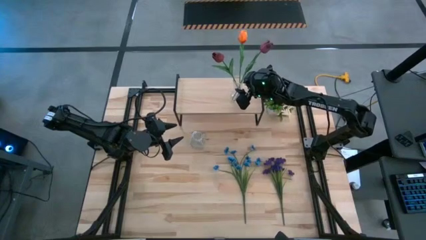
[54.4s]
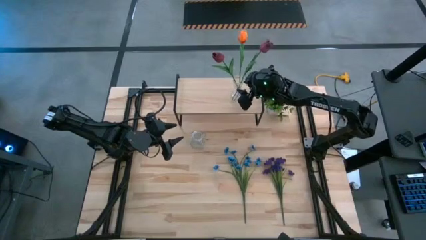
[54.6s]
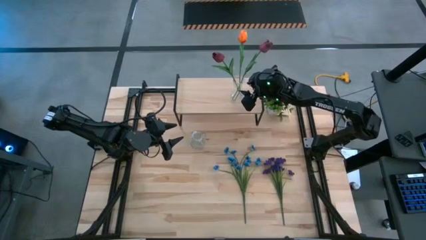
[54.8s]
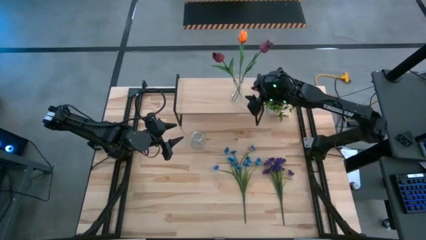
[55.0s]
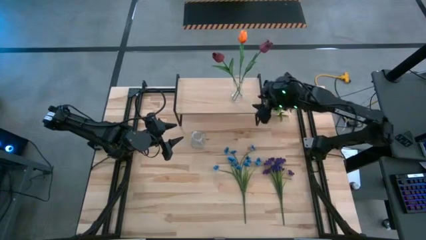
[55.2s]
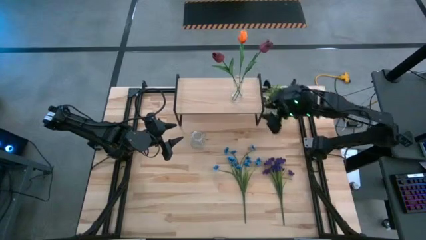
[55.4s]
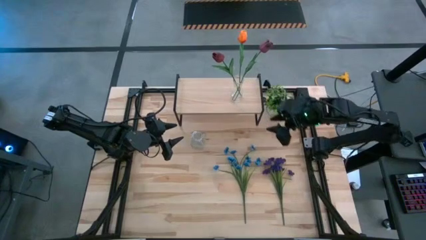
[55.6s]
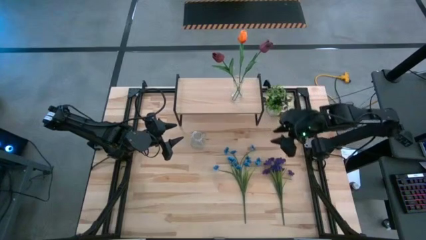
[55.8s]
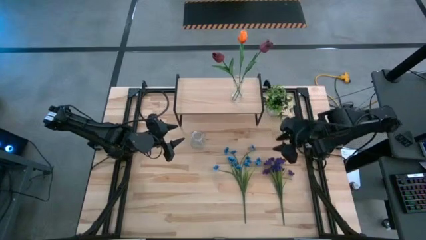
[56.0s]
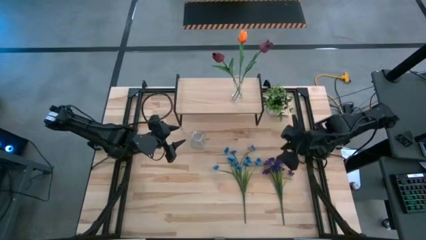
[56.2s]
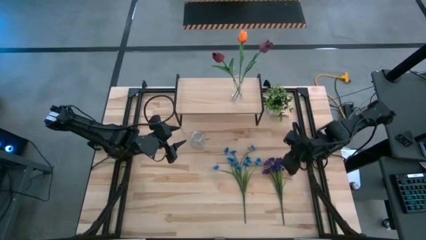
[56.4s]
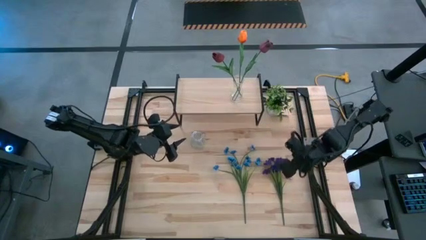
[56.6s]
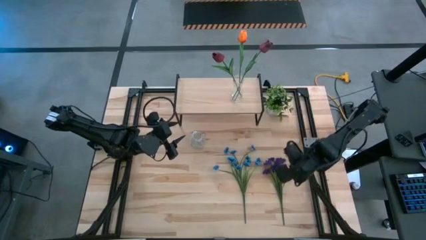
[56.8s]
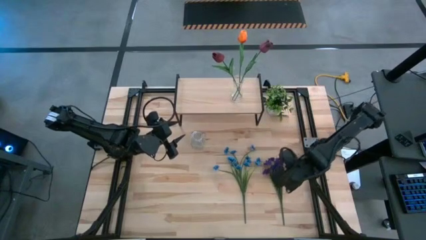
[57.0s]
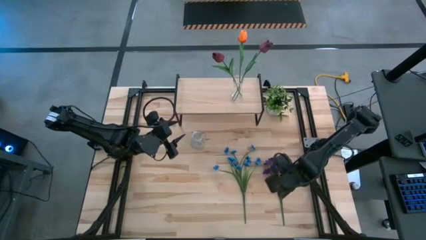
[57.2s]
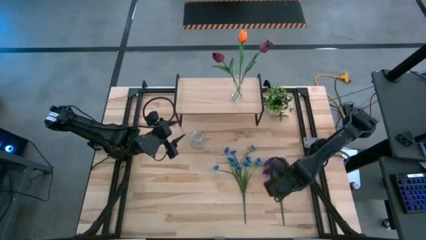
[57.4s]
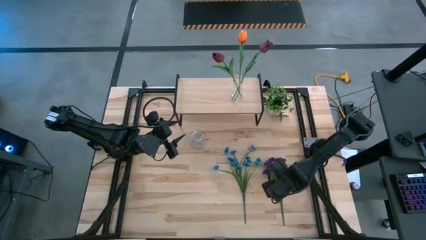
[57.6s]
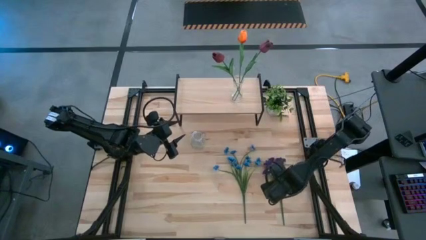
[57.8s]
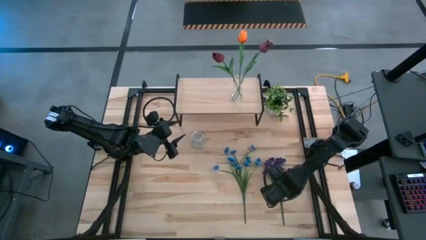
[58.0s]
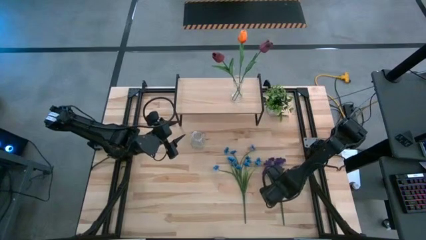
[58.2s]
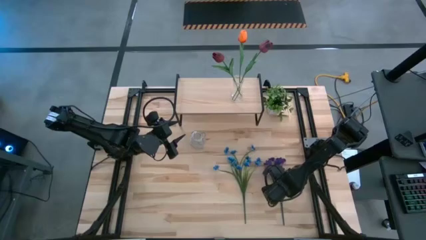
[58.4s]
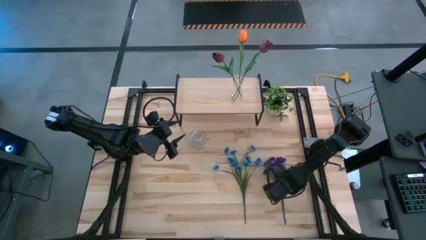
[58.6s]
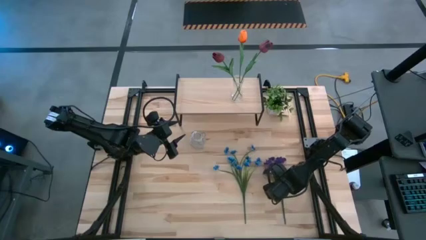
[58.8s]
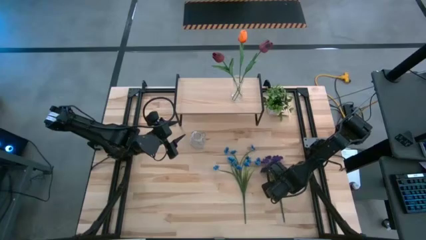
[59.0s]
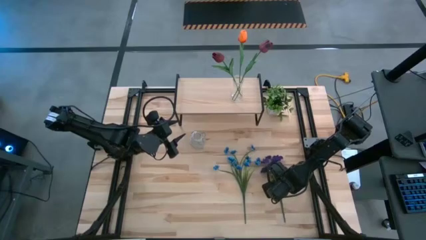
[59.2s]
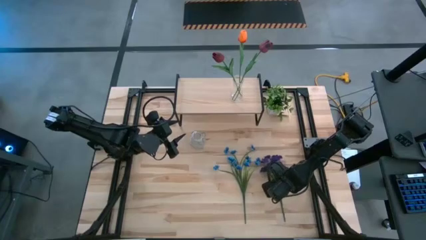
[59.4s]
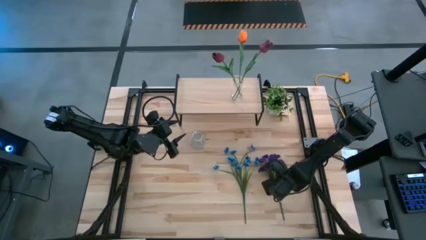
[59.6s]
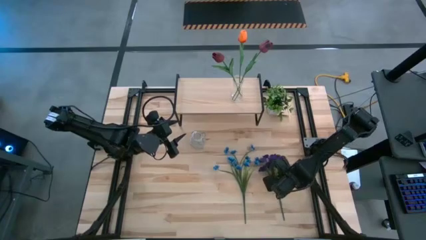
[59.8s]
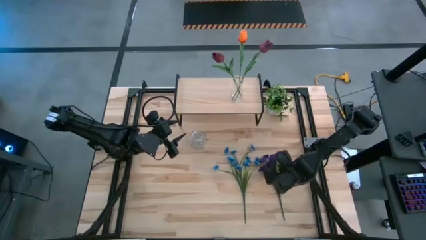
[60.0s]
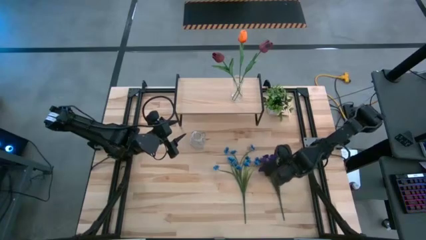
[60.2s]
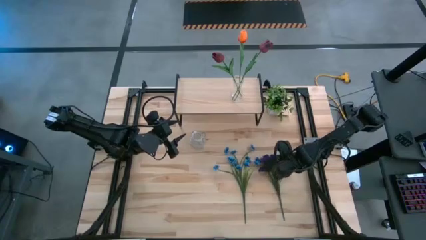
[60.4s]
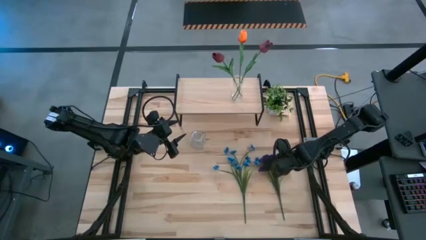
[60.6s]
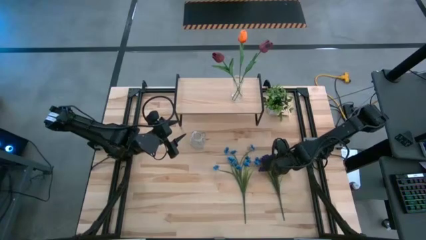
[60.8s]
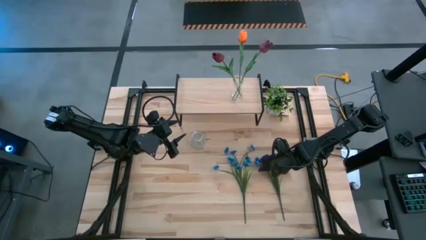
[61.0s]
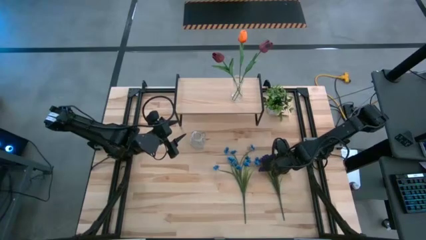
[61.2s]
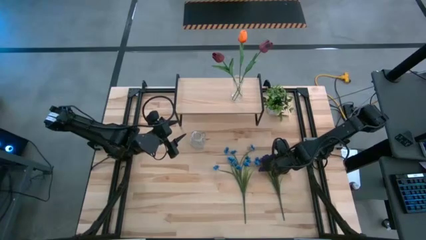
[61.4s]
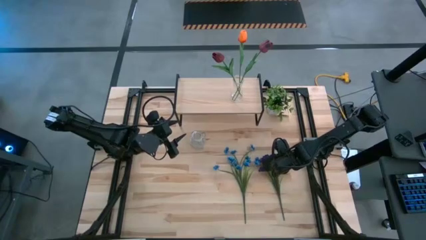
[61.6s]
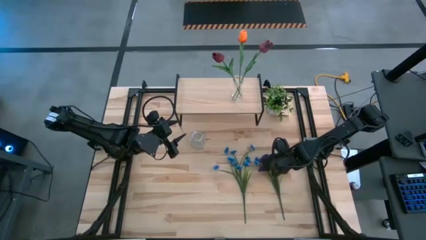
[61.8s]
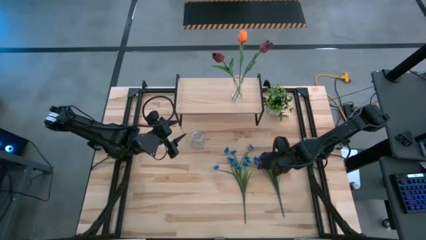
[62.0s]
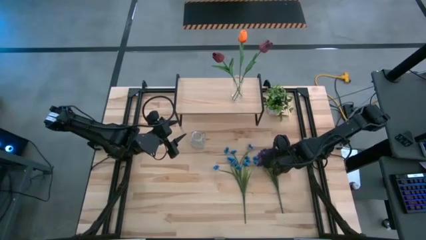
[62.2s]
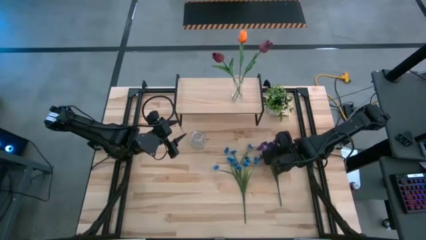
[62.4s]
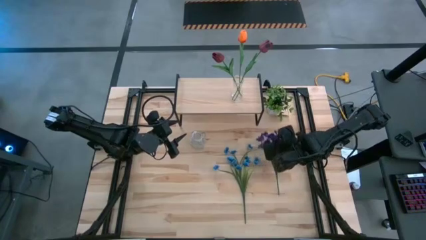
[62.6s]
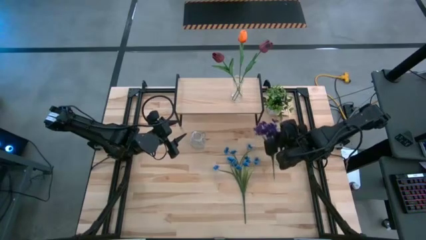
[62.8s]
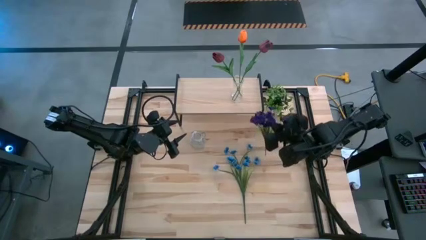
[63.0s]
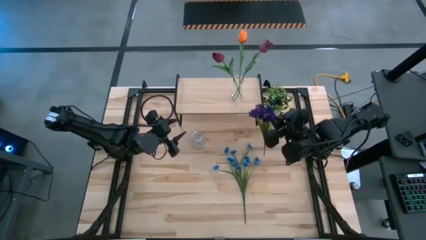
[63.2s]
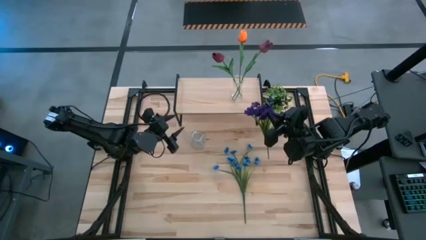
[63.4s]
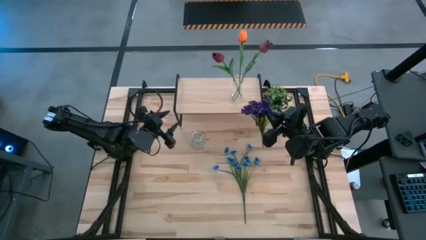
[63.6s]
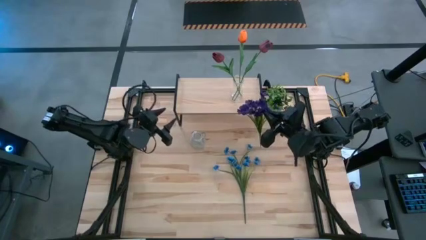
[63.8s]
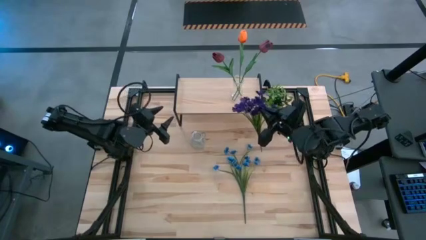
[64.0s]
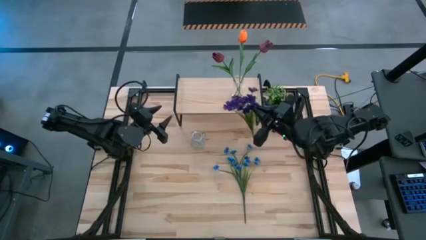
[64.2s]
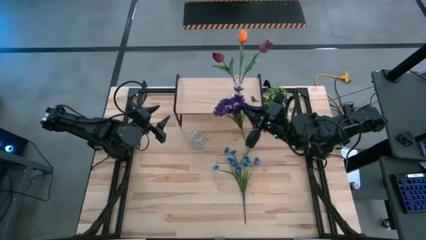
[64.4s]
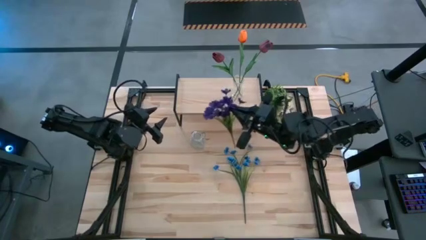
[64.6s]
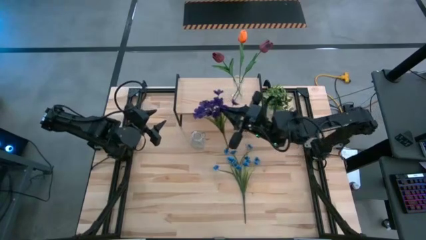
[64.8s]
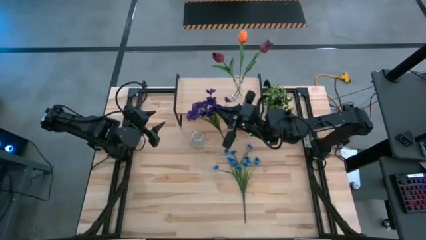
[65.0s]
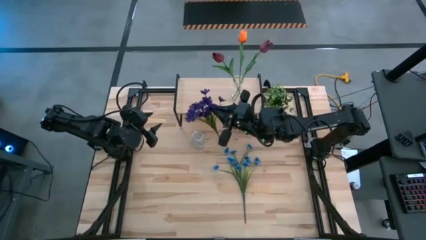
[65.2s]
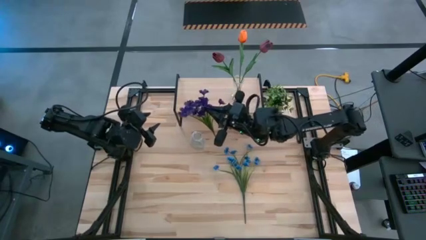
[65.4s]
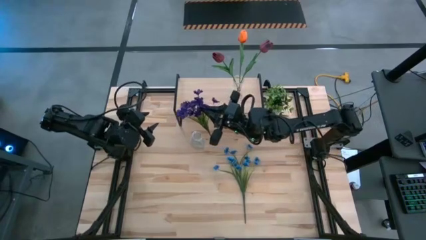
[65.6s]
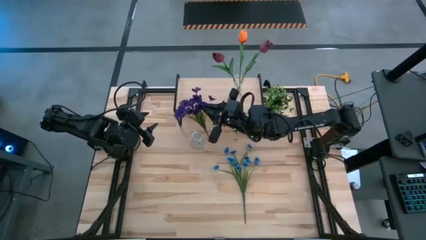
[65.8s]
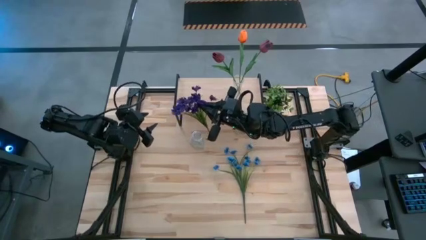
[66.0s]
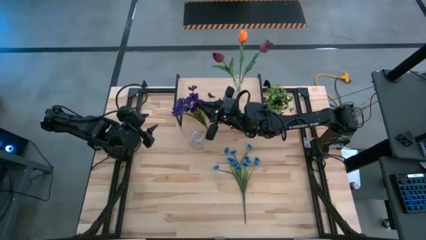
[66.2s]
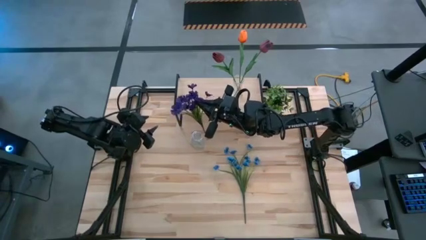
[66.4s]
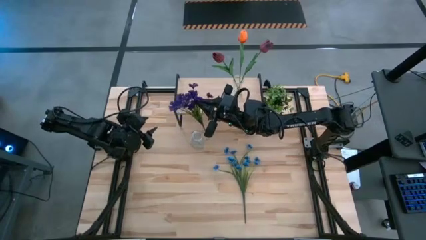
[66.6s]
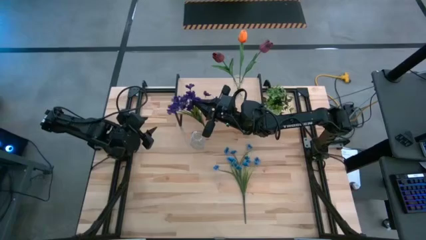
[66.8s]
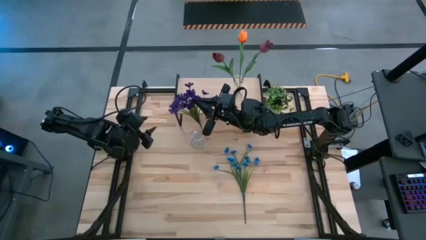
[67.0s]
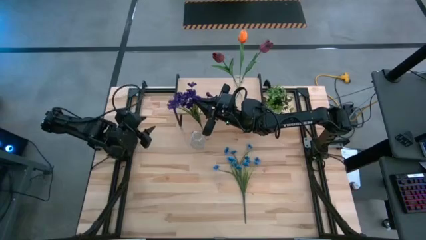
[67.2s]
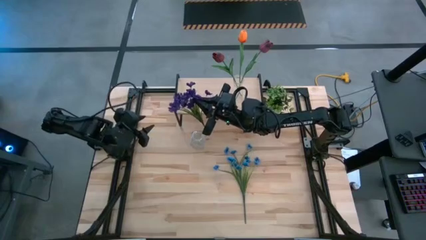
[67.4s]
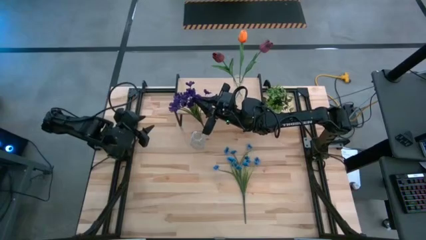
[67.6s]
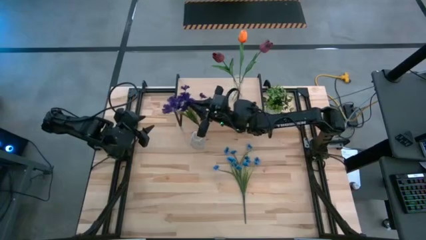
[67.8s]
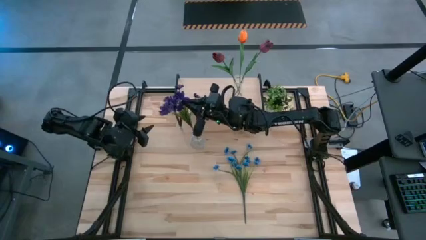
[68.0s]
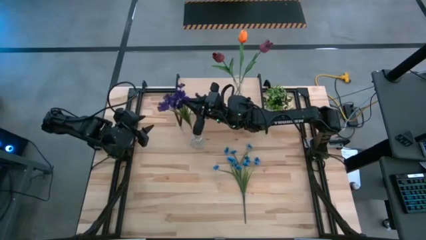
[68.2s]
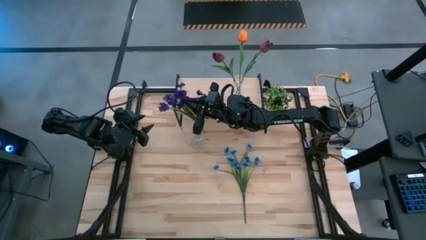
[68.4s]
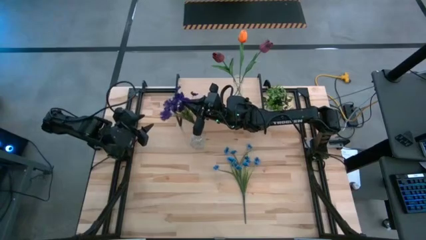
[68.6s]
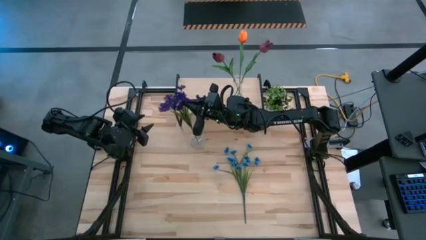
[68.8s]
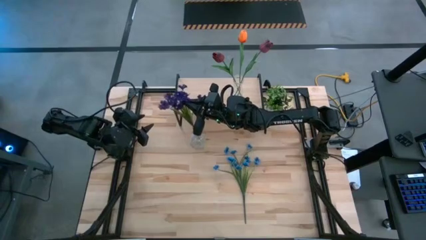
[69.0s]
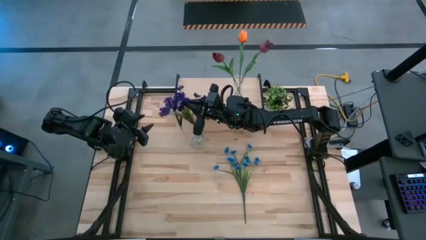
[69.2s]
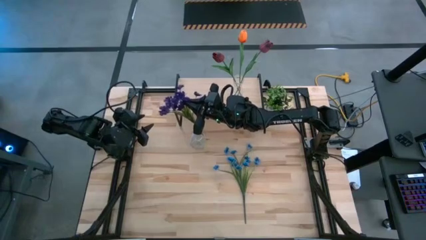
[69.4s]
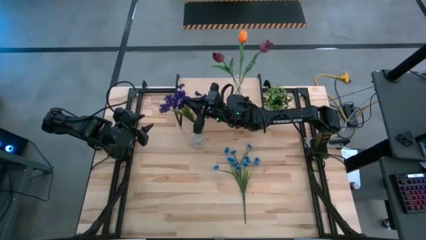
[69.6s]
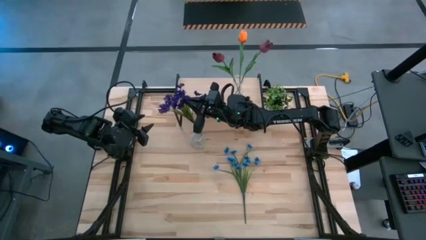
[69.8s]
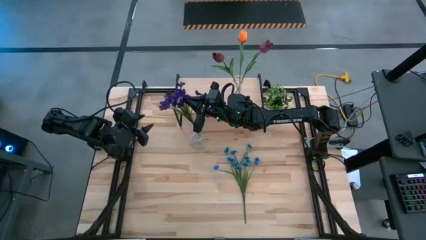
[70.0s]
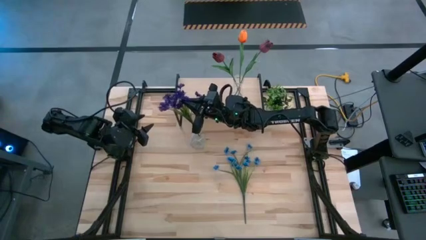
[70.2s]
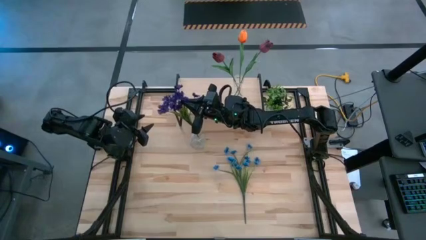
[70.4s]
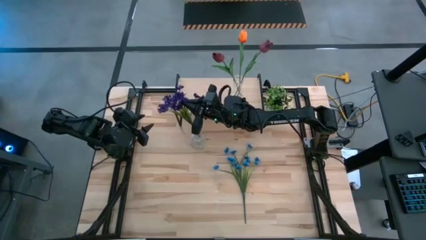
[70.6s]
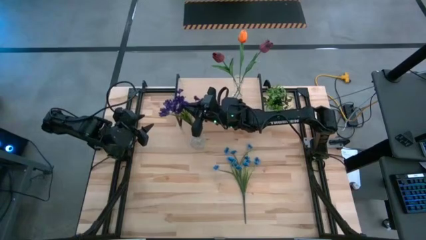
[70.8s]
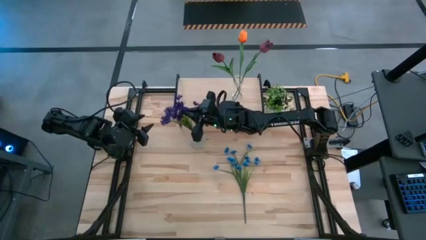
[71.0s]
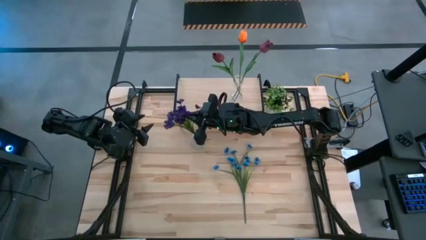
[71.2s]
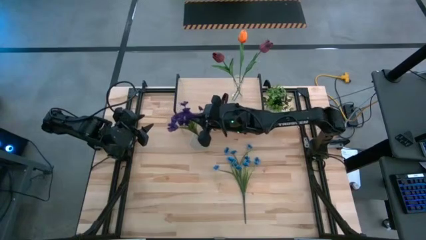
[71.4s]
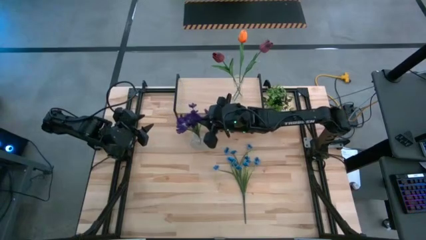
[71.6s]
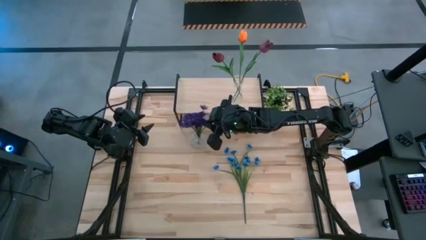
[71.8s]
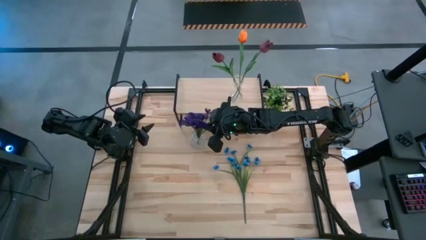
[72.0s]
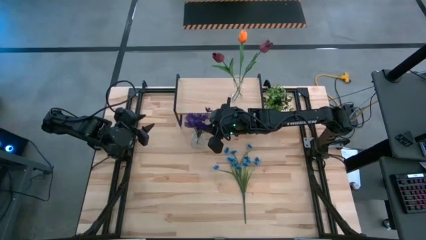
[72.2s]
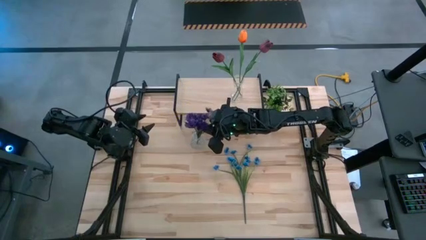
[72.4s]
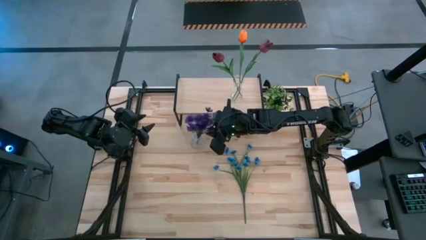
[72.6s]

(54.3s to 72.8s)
Task: Pick and place flowers into a vace then onto a shelf
Put the purple flowers into the left transparent vase
